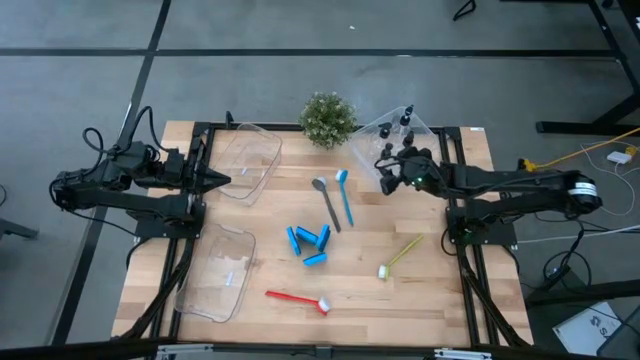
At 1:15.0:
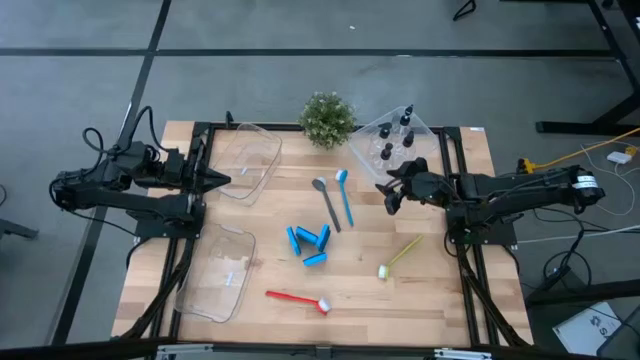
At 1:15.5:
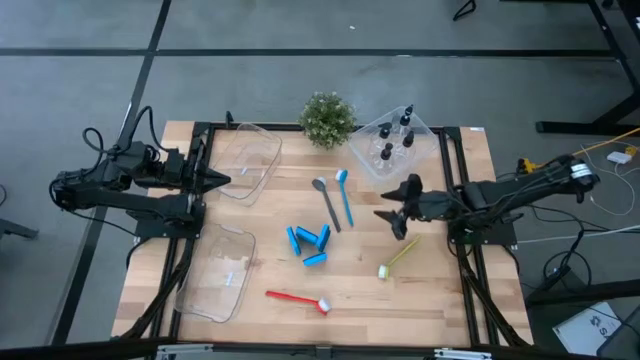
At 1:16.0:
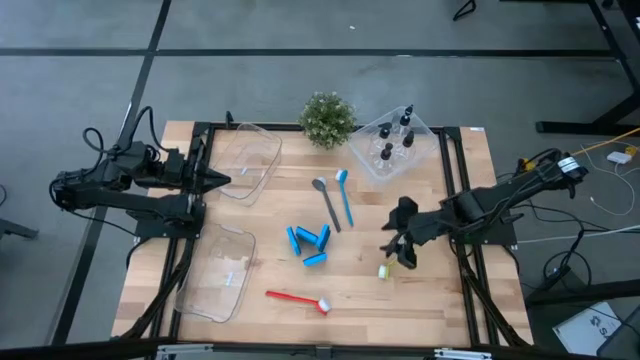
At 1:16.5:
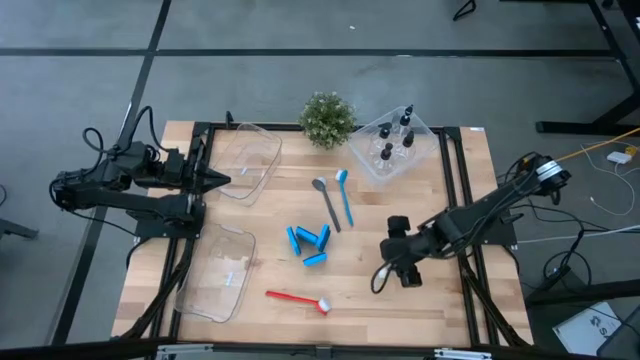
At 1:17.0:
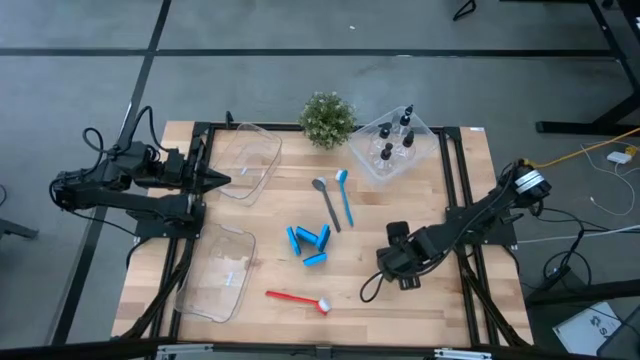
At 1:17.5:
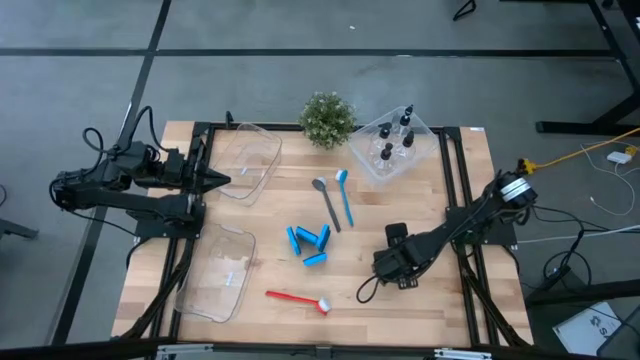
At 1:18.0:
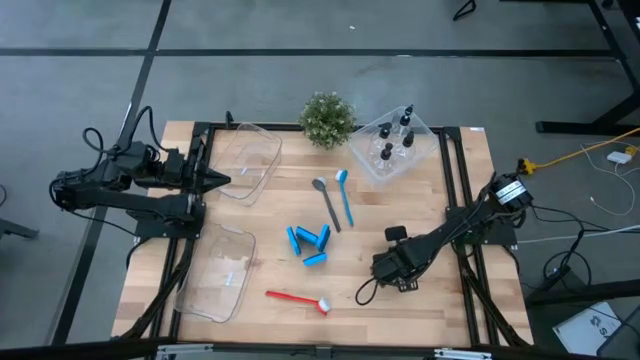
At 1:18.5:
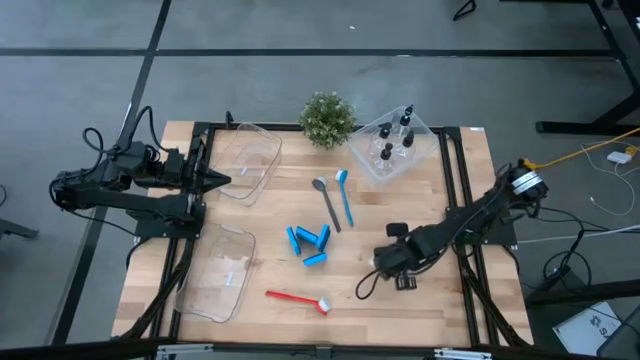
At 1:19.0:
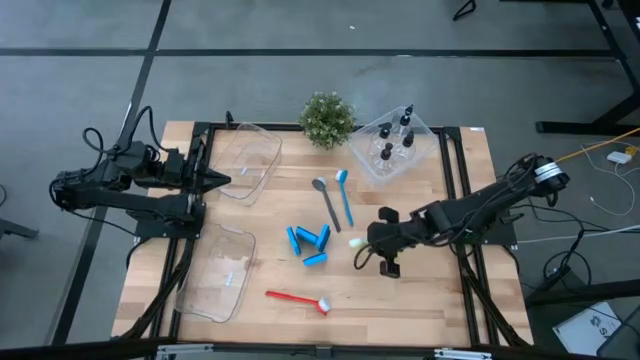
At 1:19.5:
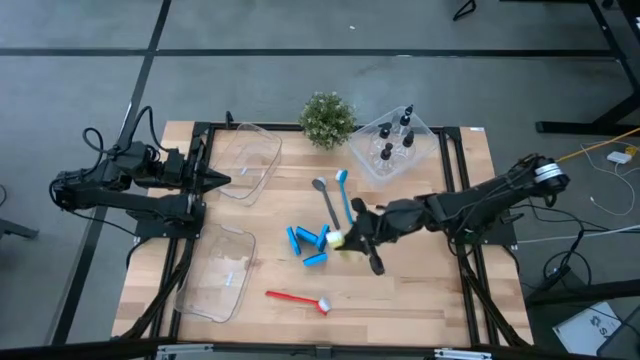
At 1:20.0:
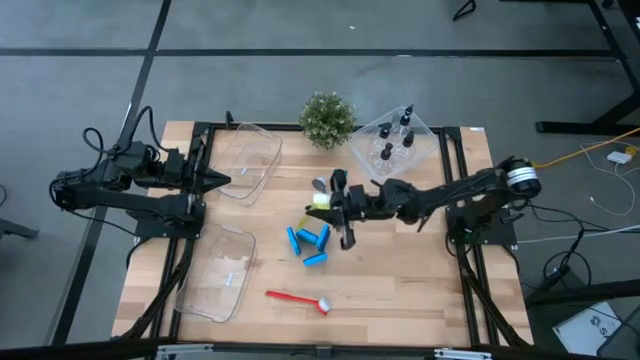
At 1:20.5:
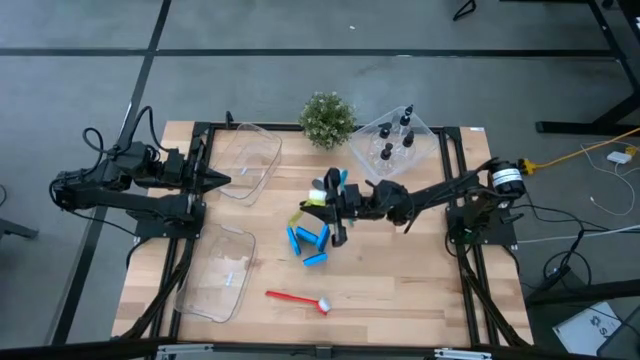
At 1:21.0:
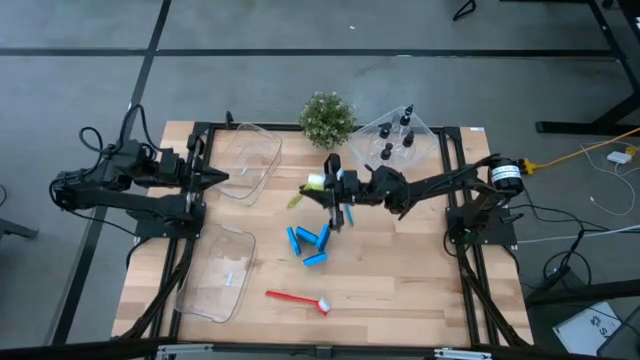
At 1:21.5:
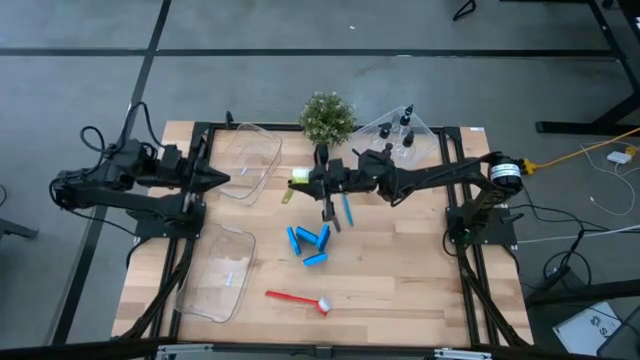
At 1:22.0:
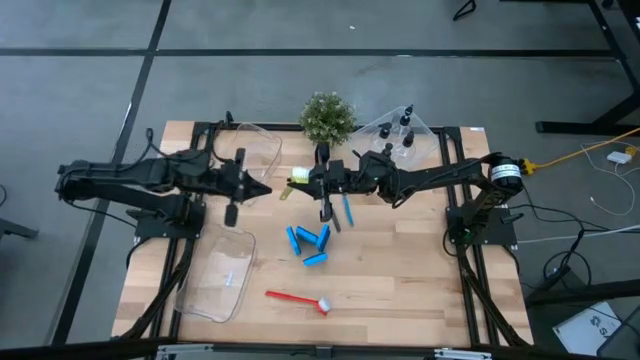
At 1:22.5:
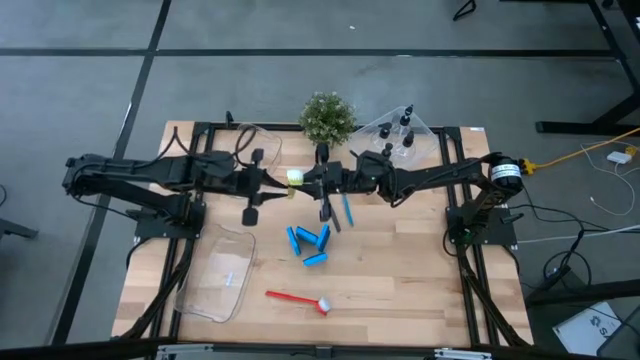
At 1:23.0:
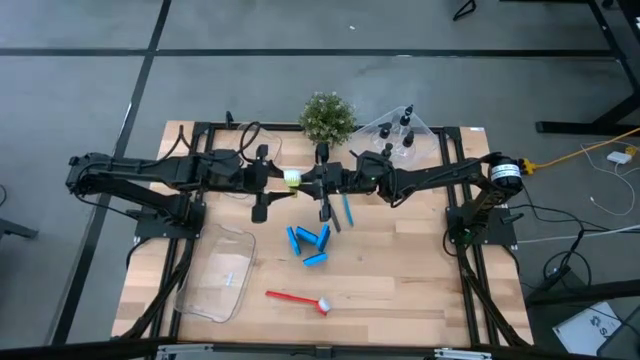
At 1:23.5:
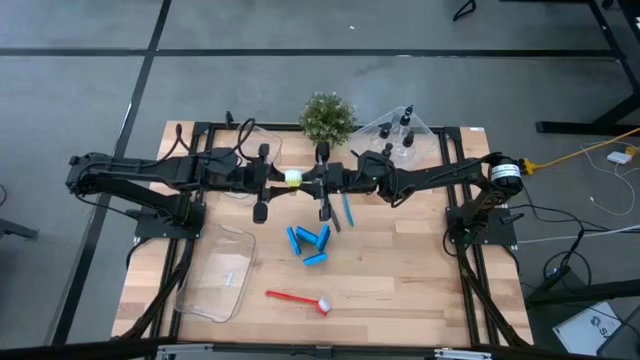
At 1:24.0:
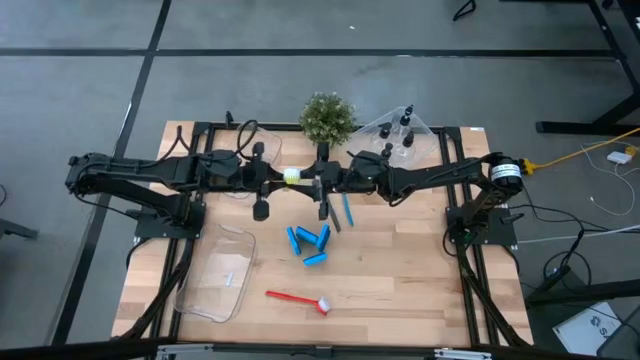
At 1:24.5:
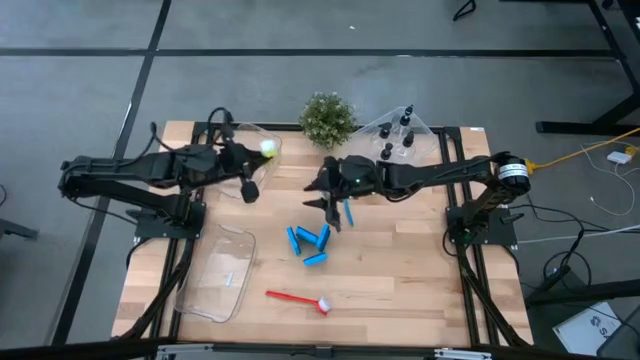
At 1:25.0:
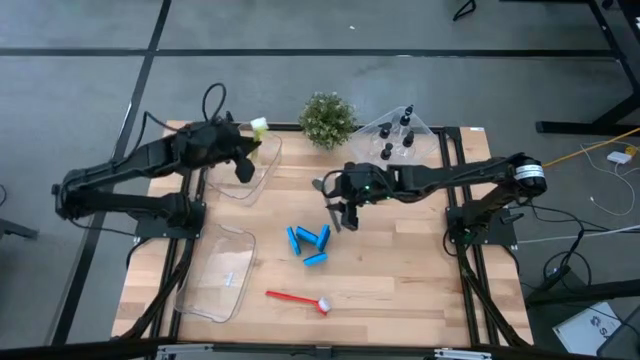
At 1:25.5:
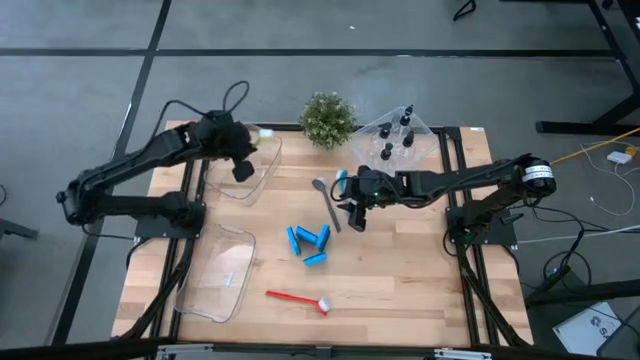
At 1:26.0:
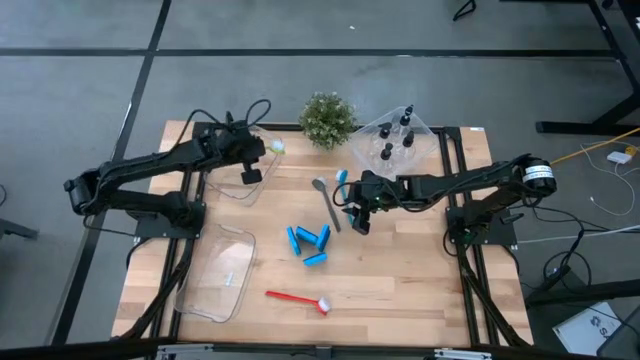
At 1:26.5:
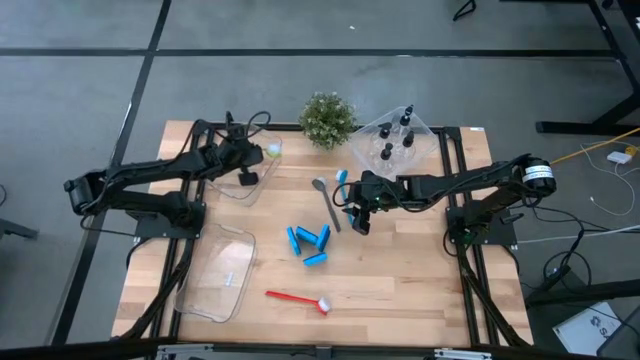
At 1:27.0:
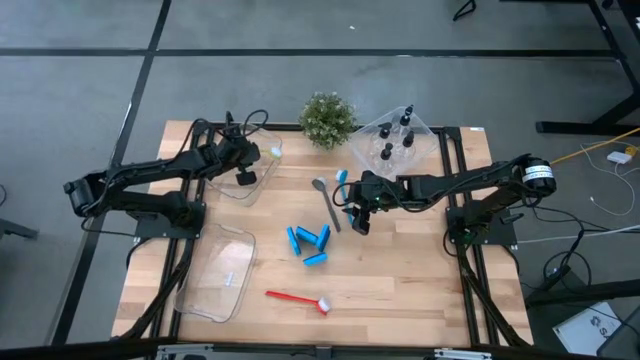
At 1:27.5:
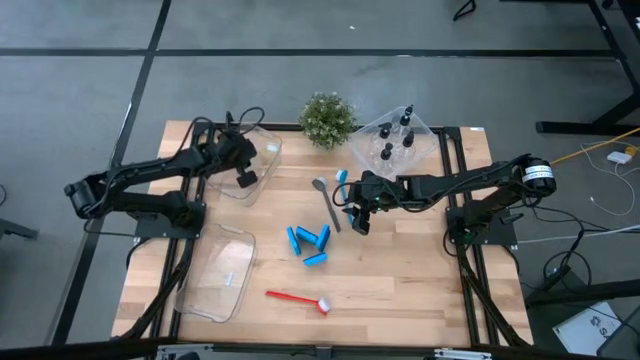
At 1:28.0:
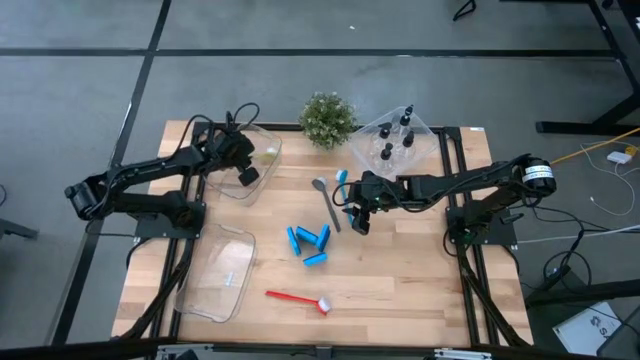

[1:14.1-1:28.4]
Task: Pick & Place Kitchen Sink Supplies
Put the yellow dish brush into the top transparent bin

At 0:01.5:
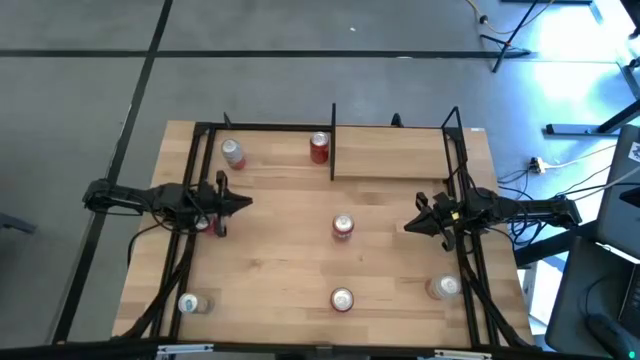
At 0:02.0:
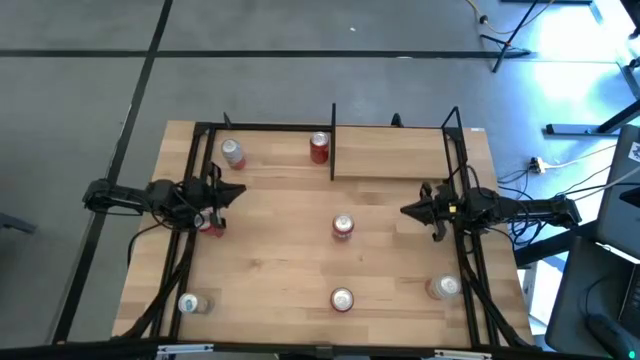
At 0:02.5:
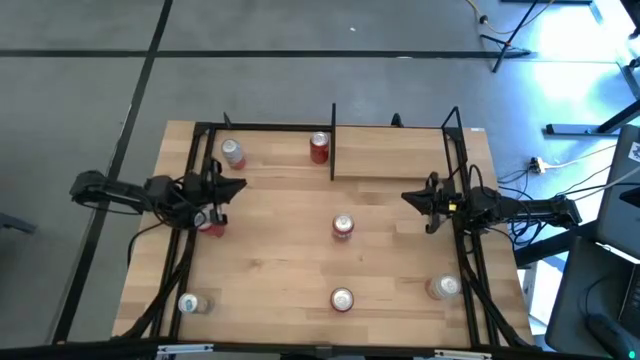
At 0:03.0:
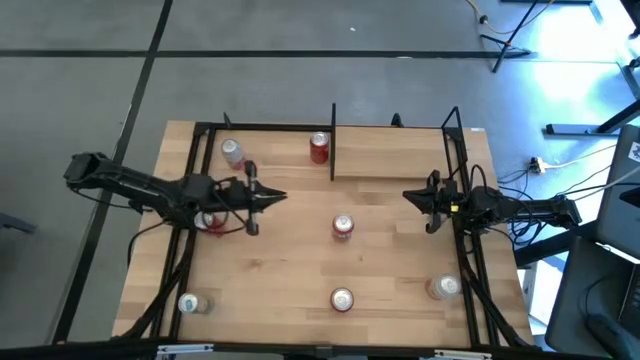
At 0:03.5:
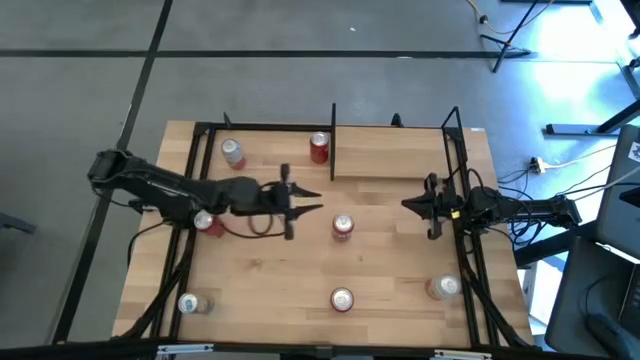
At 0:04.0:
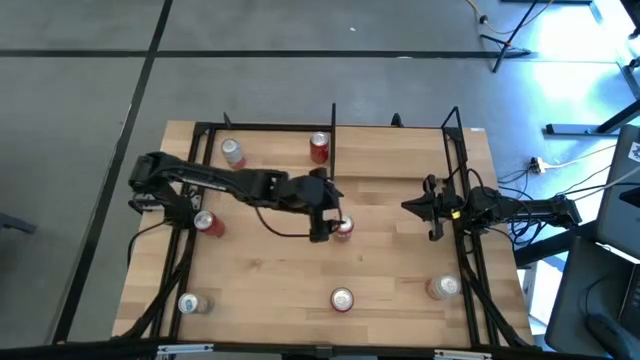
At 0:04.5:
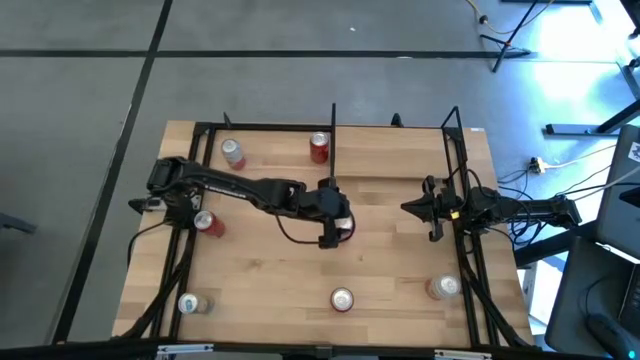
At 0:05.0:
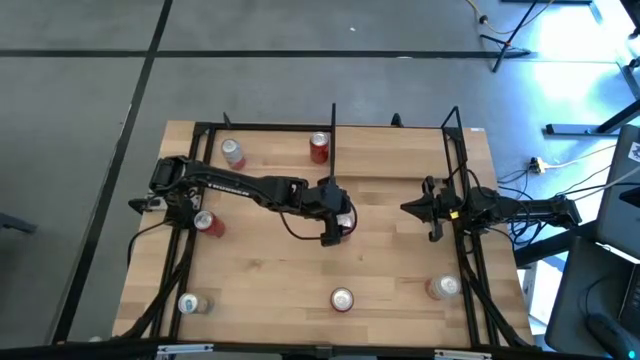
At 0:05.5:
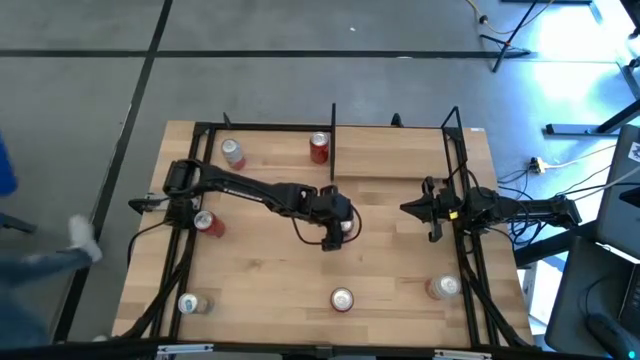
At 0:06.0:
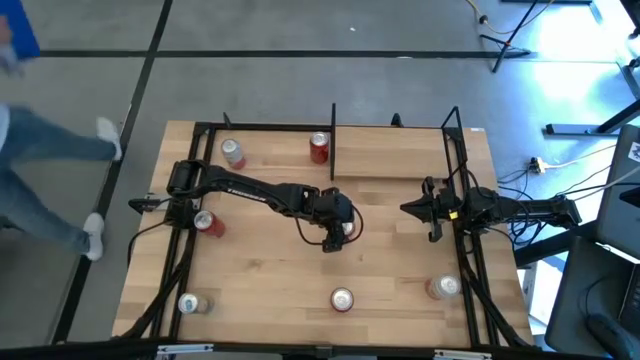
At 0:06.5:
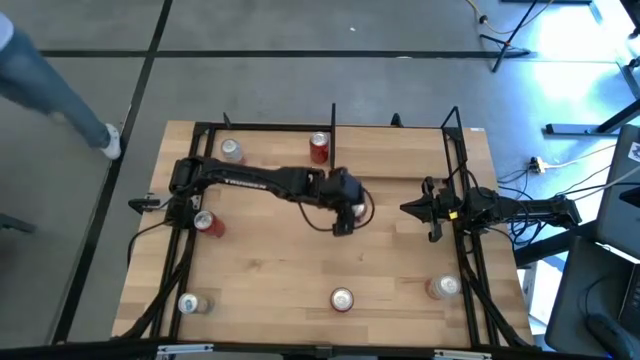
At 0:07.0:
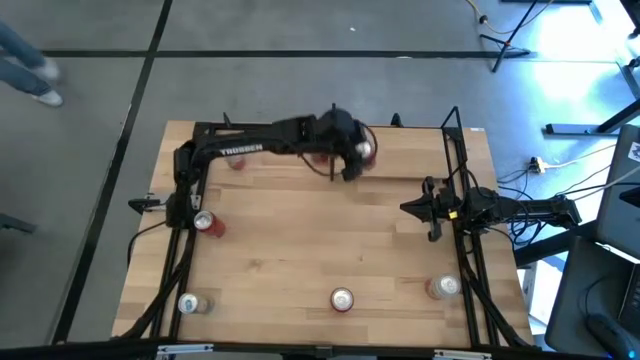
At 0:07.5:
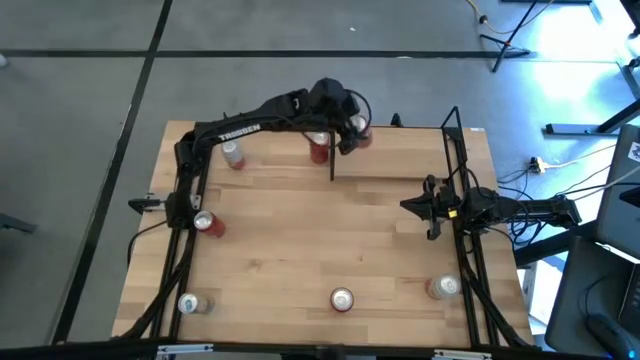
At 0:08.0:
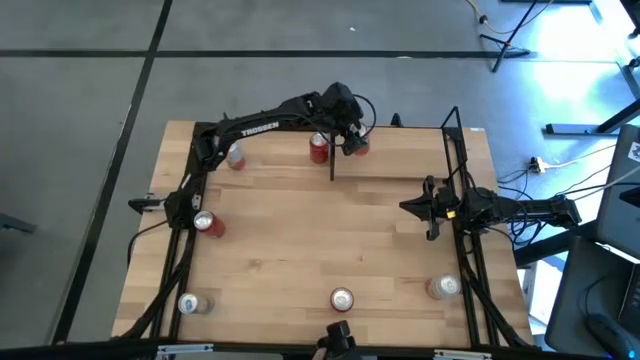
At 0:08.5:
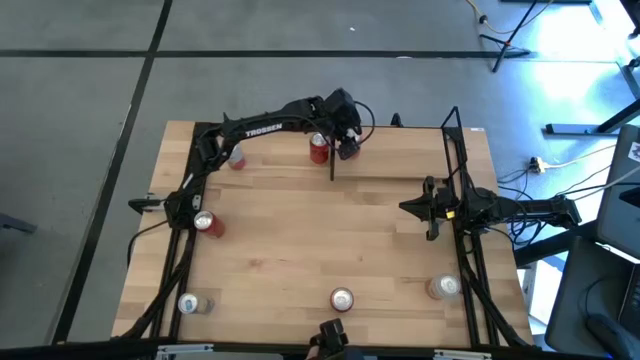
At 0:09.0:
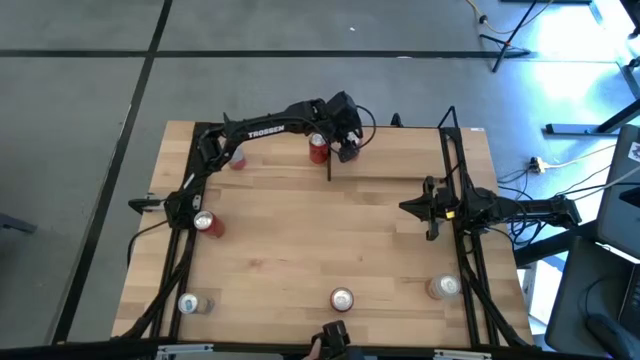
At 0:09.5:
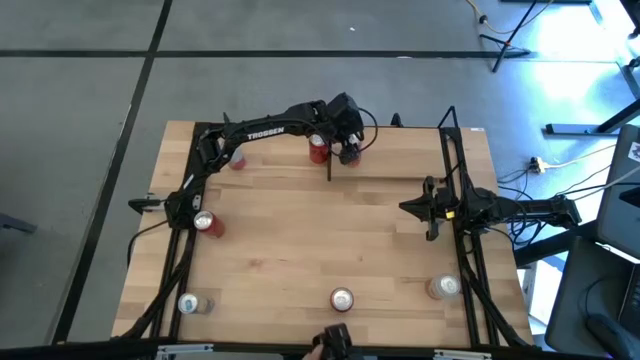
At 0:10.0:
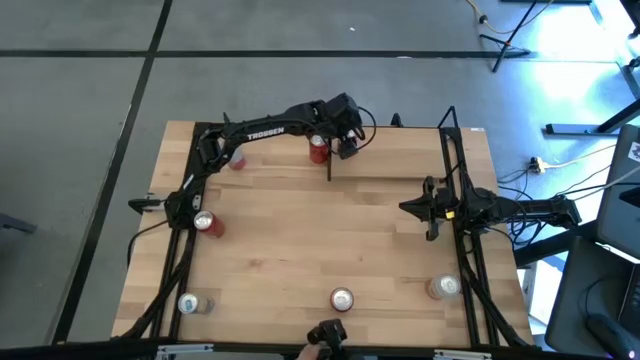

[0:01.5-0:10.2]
Task: Place canned beverage on shelf
Put the red soda can on the shelf
